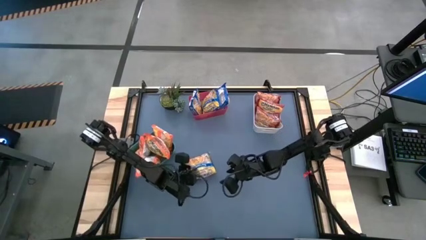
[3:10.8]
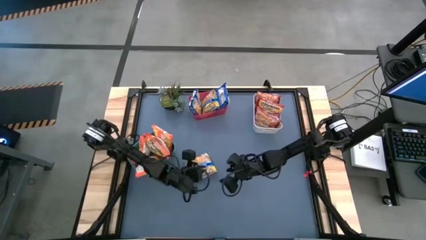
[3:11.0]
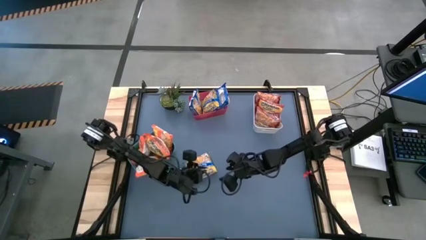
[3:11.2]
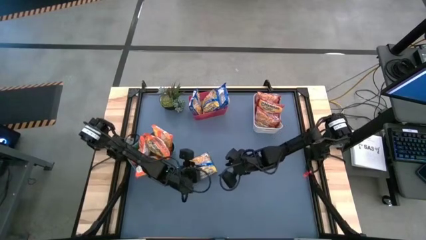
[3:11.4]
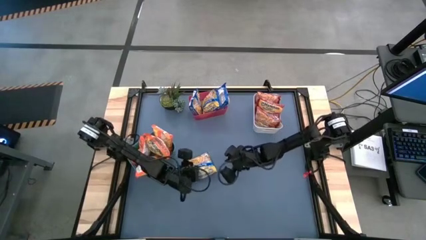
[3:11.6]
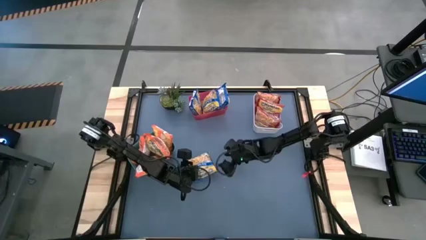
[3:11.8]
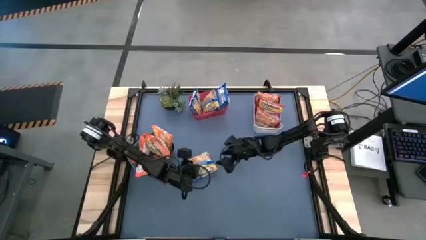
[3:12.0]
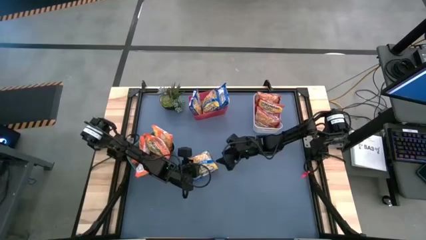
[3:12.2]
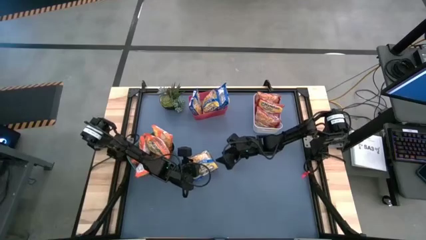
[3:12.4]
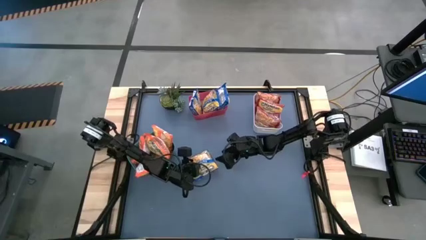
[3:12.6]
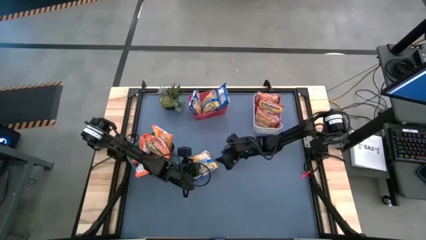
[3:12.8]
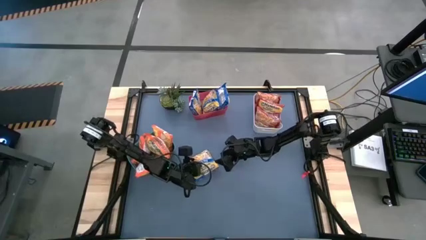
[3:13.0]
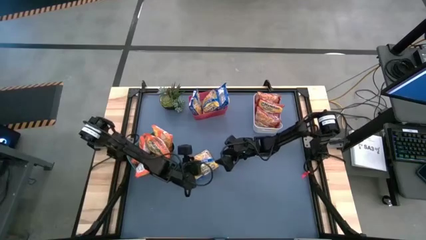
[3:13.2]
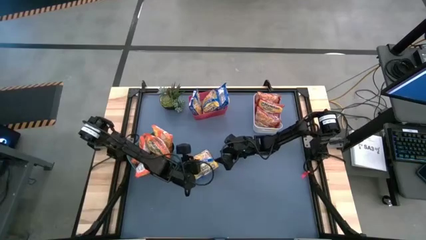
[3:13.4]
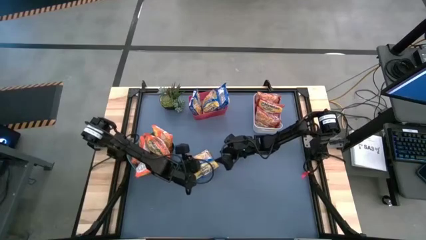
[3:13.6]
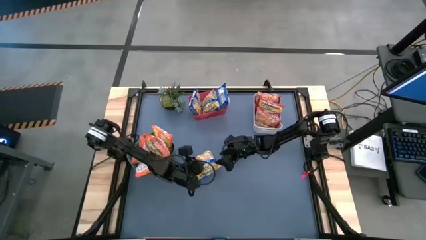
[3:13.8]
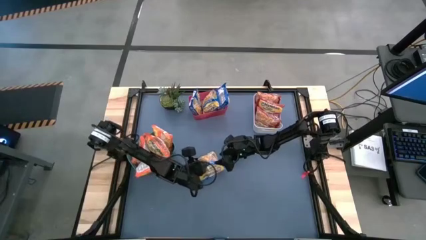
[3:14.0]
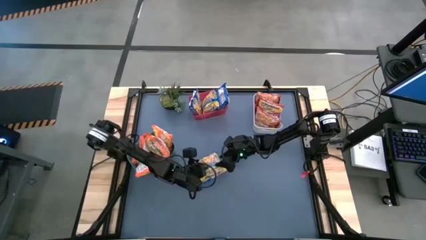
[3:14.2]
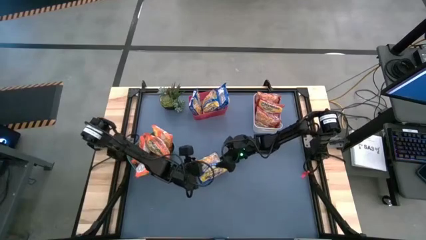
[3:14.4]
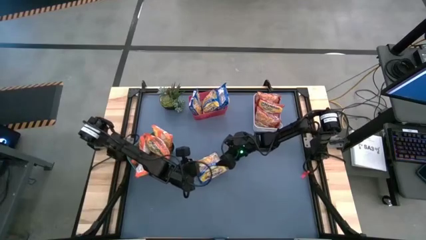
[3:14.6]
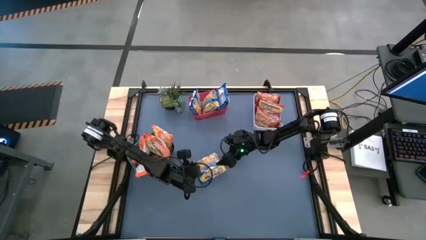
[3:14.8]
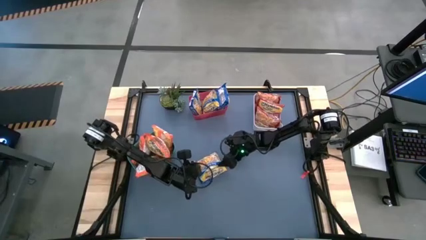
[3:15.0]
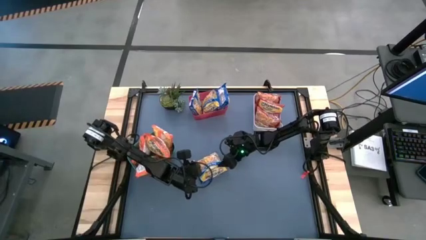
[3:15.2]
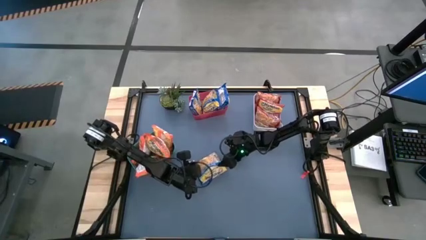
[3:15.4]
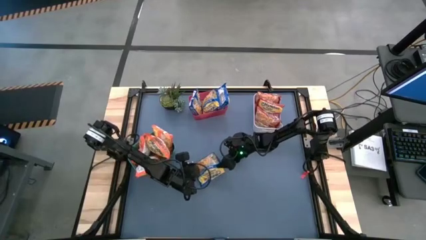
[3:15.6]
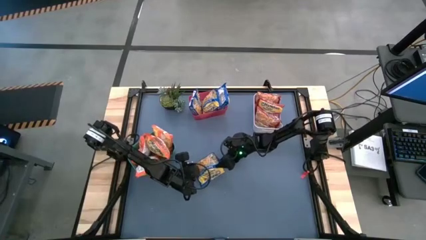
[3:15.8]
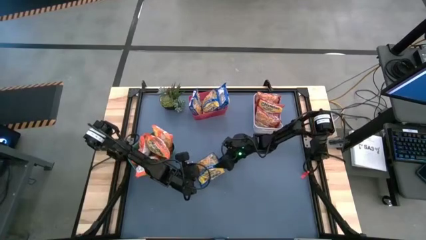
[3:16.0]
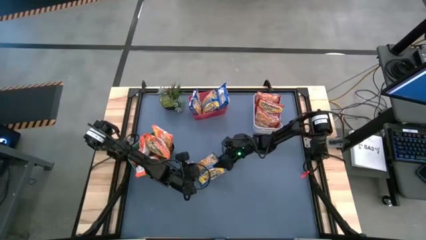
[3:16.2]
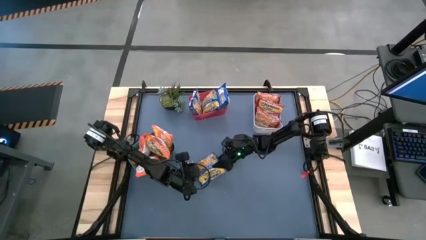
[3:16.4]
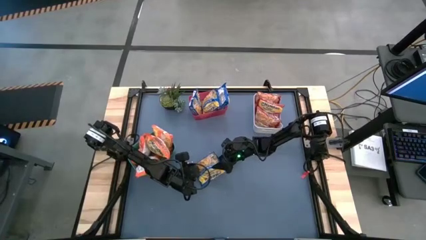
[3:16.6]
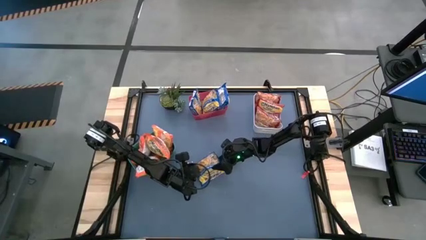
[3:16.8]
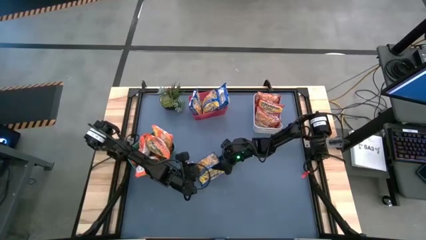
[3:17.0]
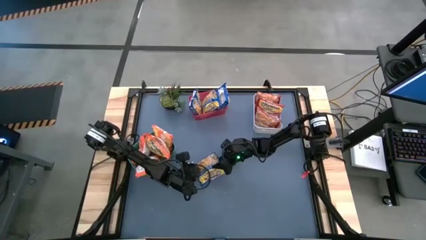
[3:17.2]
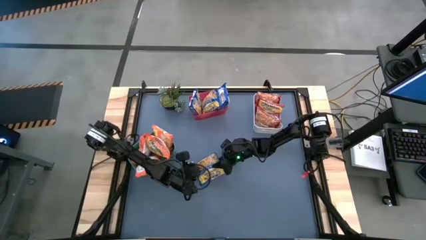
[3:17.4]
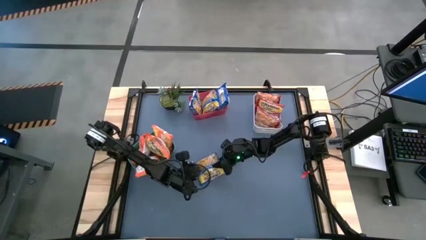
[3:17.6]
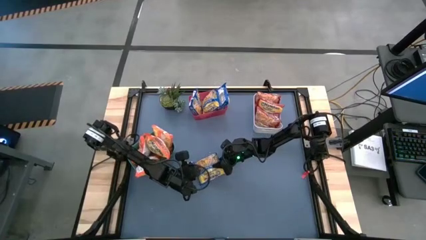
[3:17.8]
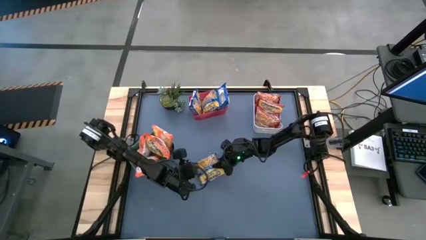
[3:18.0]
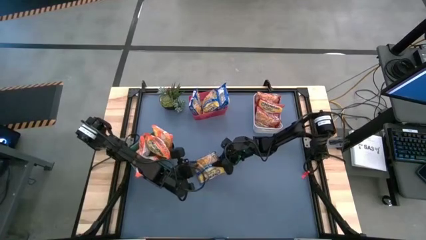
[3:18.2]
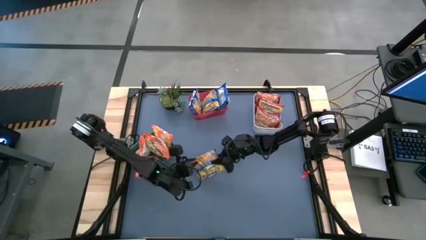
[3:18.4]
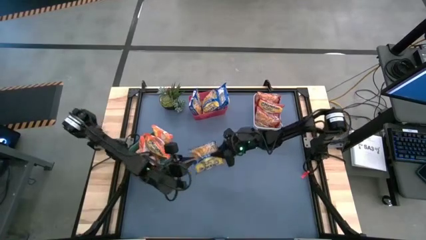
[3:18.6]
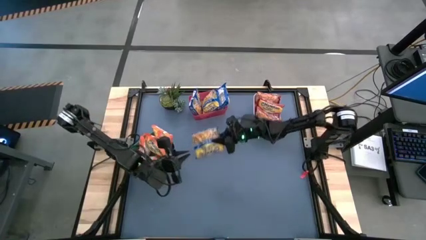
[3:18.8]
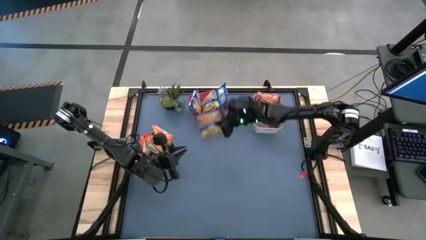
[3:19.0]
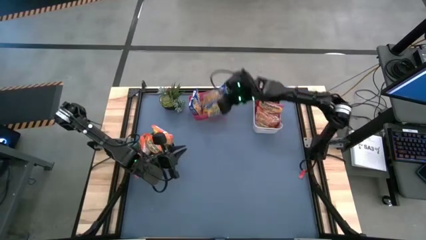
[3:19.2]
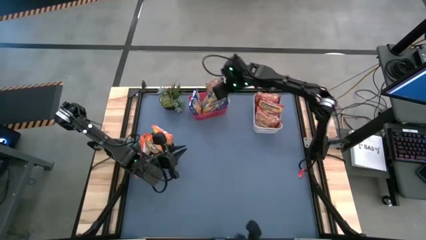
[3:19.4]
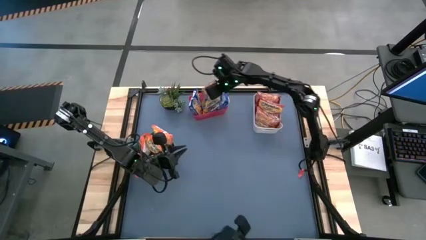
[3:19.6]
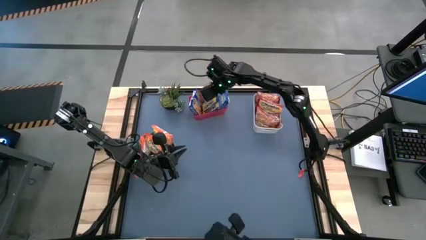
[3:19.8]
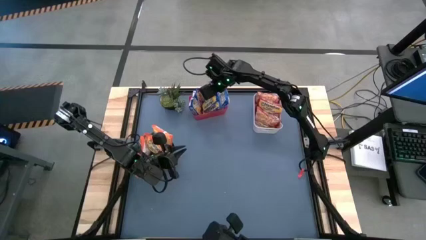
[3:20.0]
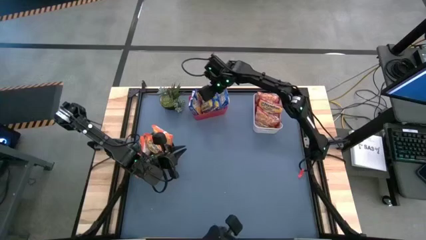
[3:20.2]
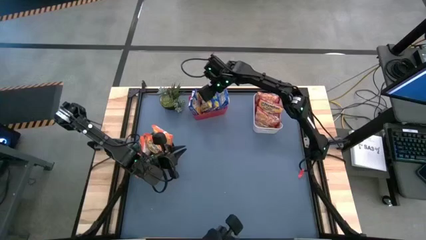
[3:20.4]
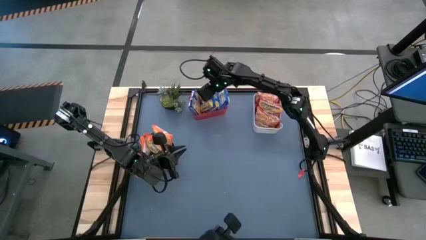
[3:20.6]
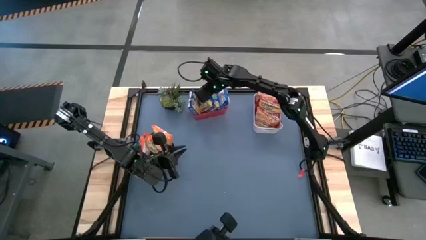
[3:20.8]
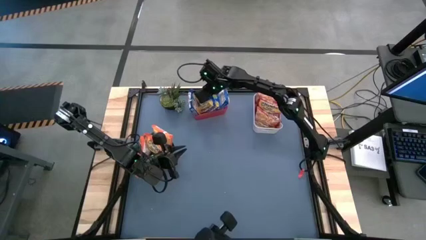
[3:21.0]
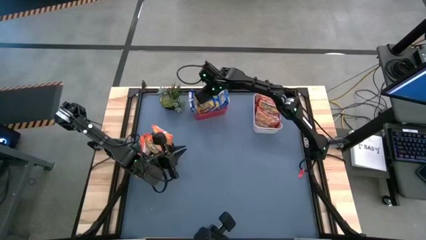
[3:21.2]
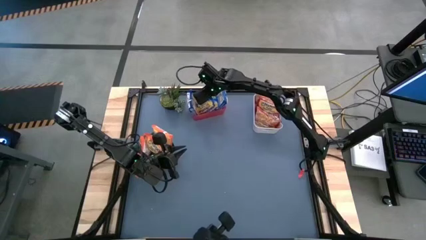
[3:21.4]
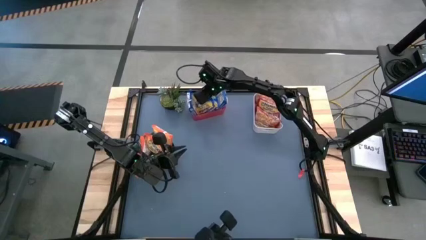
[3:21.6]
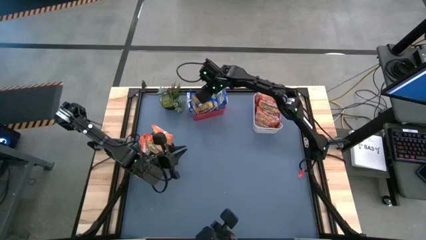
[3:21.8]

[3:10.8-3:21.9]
Task: Sort Maruchan noodles
Put the blue noodle pack into the red bin

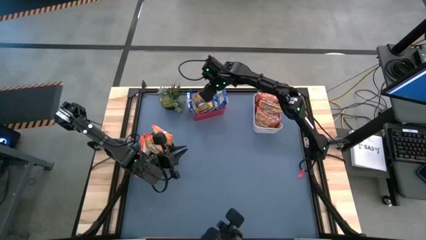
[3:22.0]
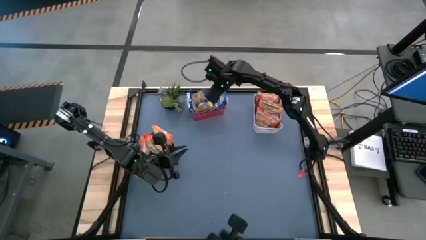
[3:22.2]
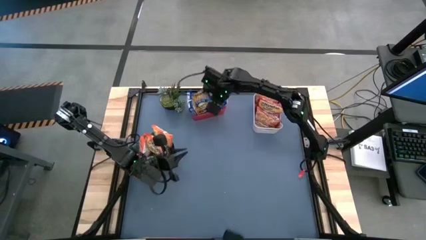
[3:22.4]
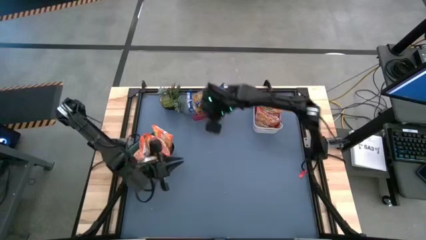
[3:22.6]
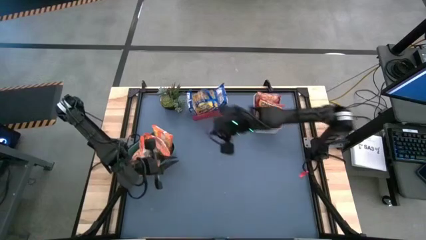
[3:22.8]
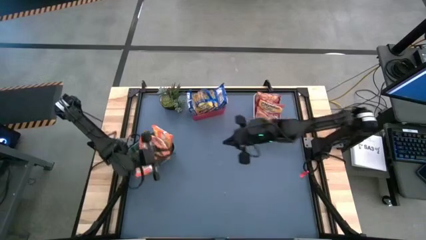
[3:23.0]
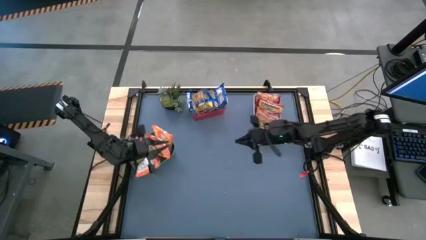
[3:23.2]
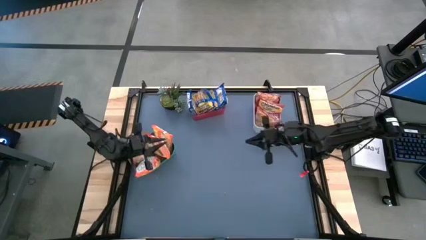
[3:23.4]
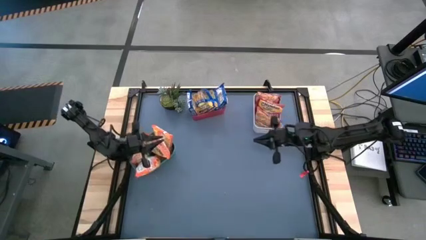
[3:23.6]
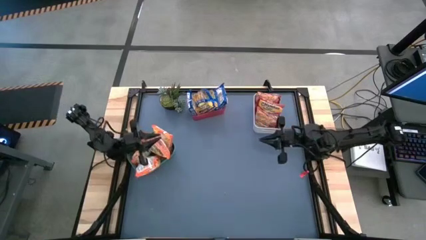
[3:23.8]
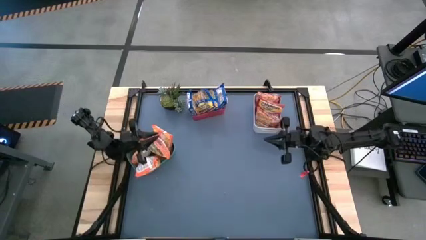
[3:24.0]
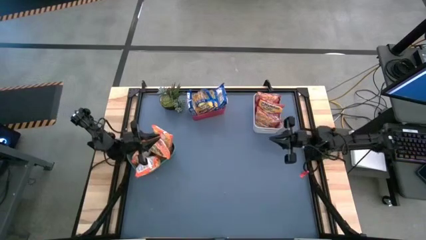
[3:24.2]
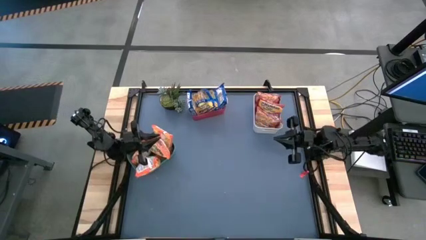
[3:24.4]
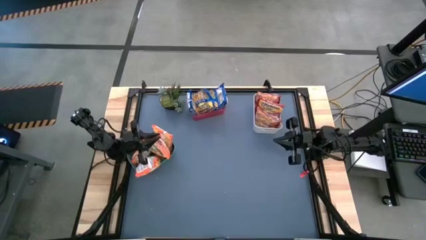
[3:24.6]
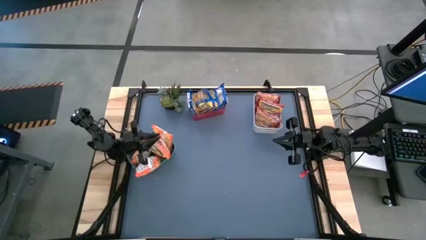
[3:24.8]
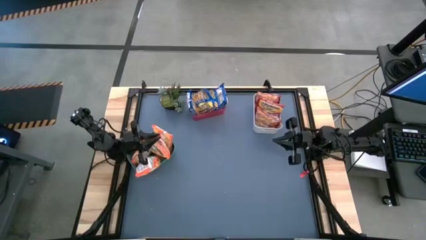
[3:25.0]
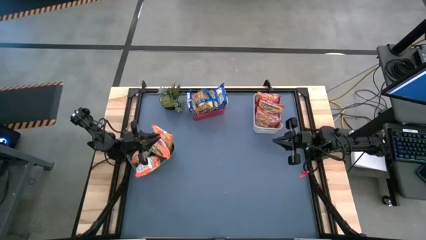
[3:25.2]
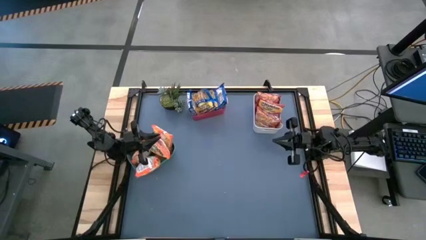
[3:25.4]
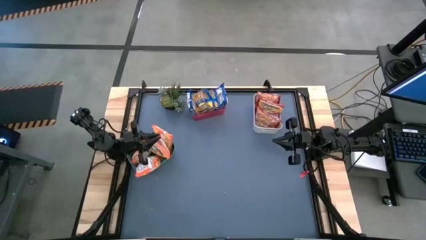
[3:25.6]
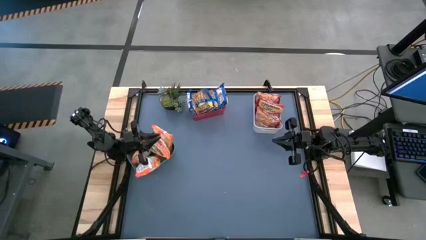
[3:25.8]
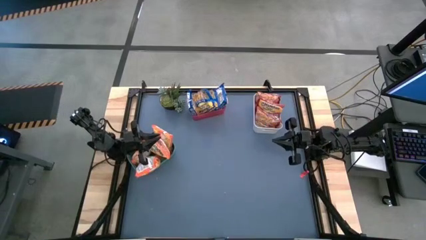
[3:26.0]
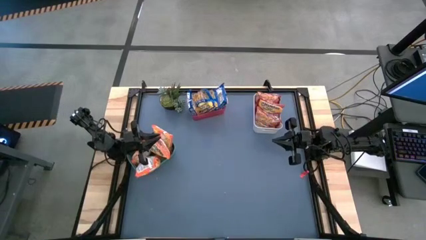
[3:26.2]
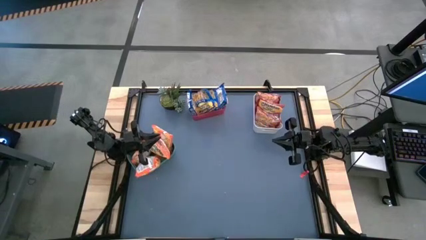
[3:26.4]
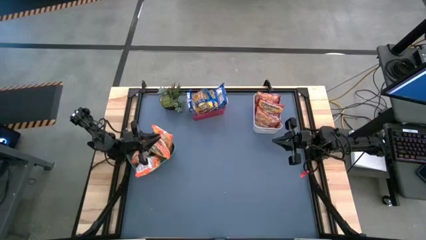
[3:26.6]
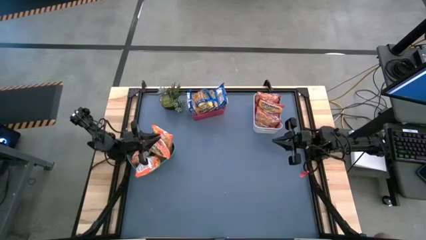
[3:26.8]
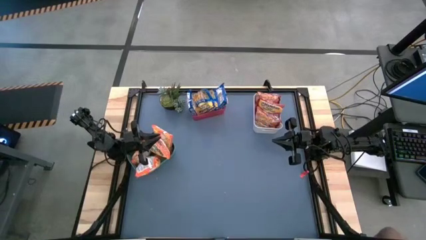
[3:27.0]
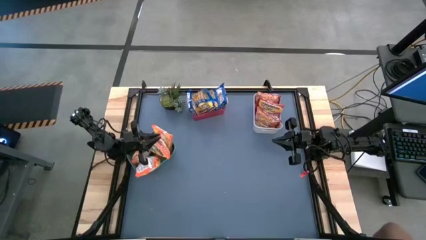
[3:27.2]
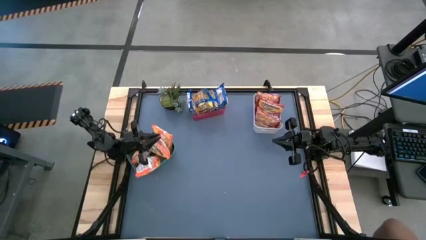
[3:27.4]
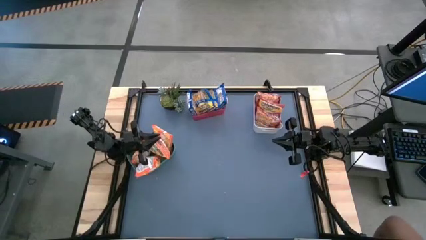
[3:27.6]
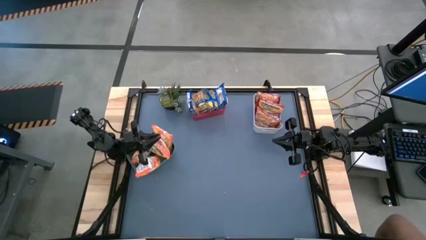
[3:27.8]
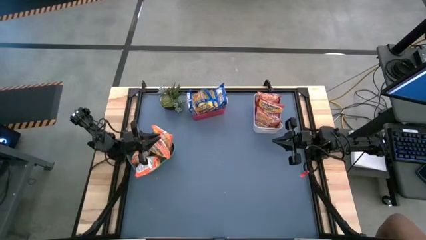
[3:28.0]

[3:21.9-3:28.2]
Return to Home Position
